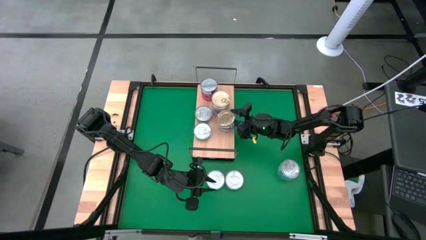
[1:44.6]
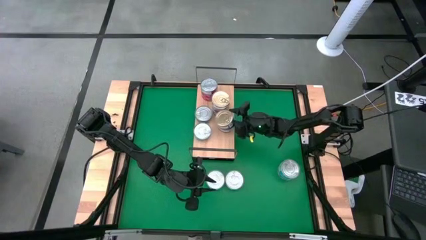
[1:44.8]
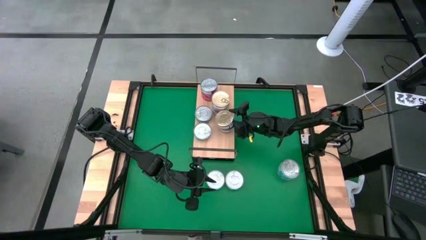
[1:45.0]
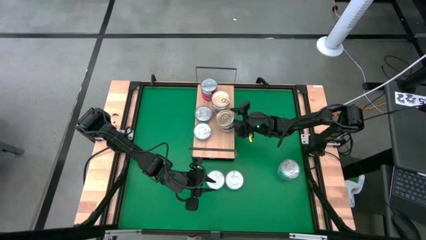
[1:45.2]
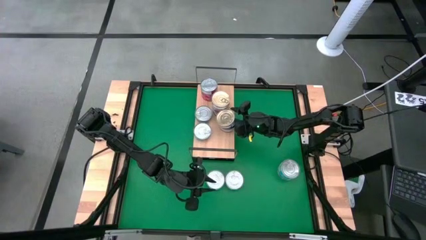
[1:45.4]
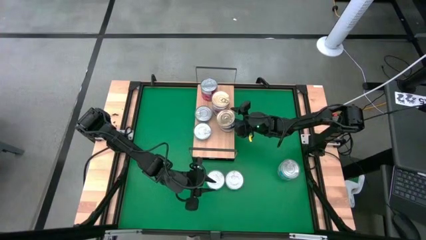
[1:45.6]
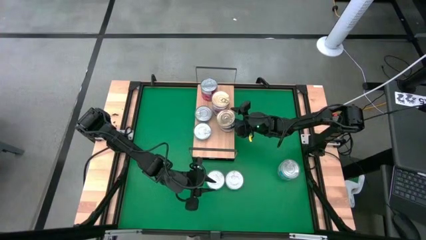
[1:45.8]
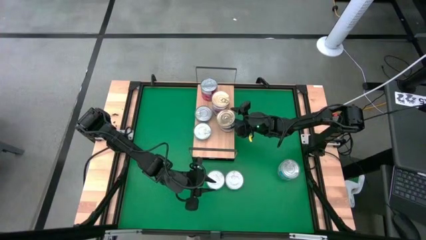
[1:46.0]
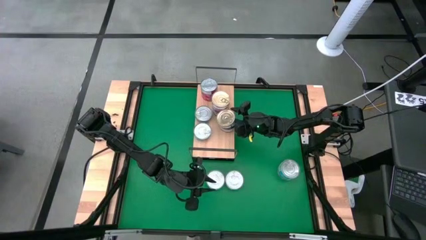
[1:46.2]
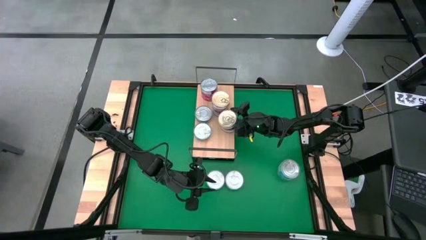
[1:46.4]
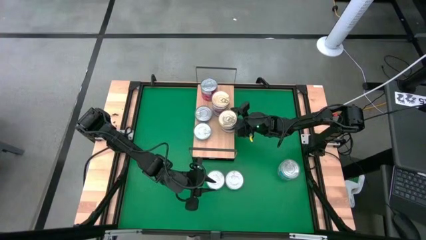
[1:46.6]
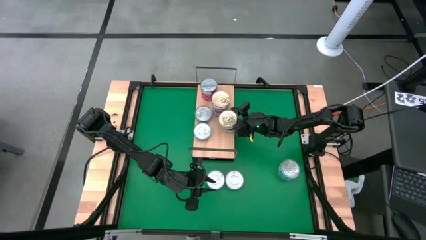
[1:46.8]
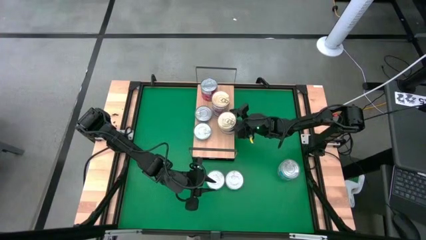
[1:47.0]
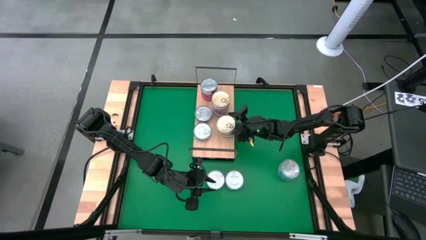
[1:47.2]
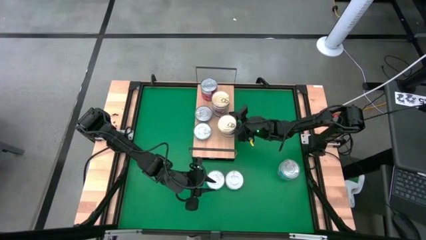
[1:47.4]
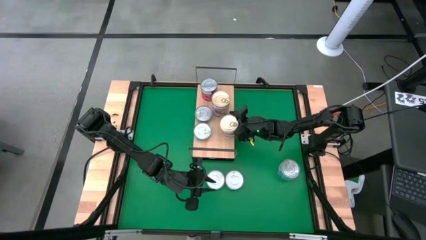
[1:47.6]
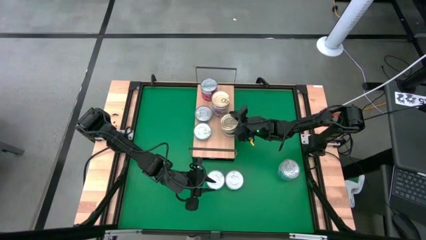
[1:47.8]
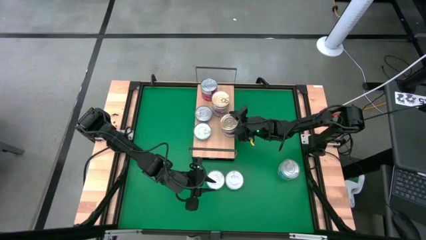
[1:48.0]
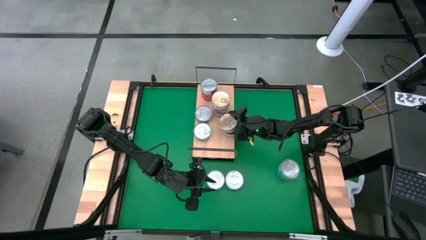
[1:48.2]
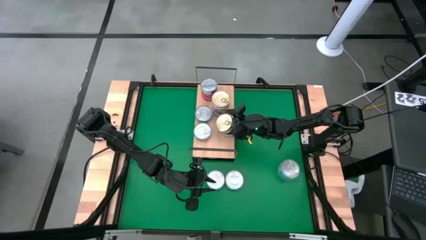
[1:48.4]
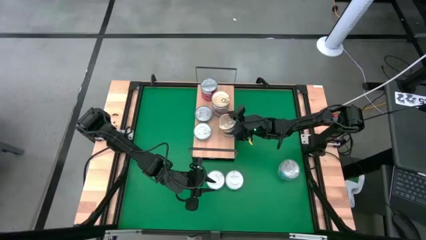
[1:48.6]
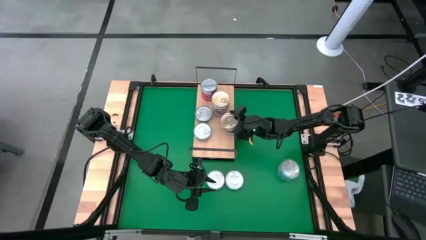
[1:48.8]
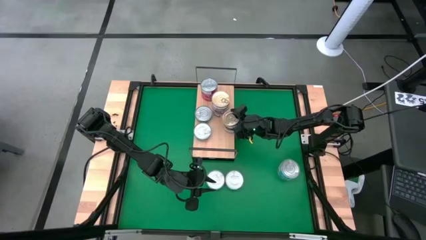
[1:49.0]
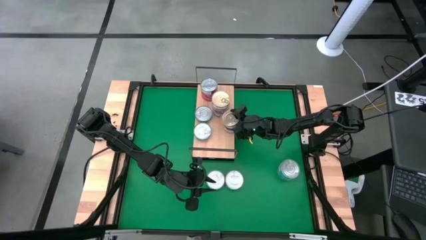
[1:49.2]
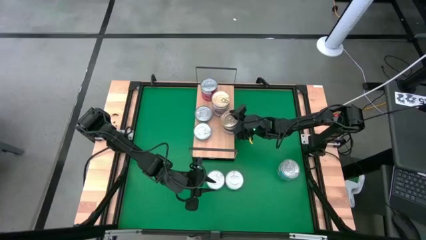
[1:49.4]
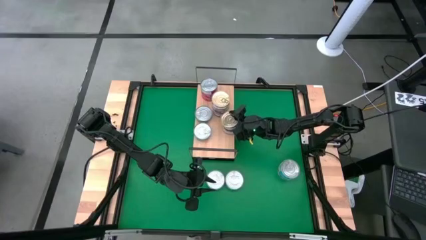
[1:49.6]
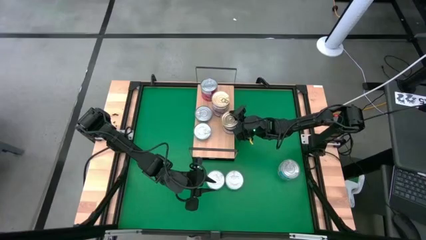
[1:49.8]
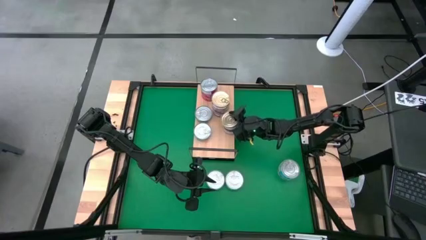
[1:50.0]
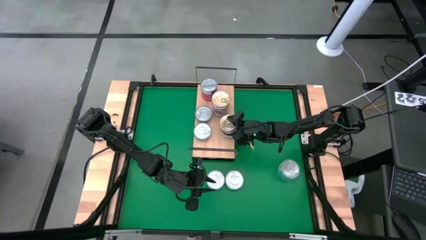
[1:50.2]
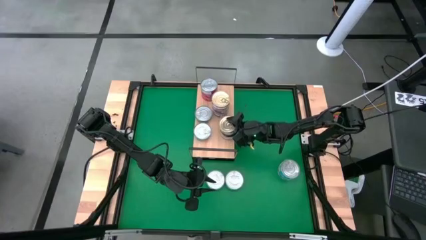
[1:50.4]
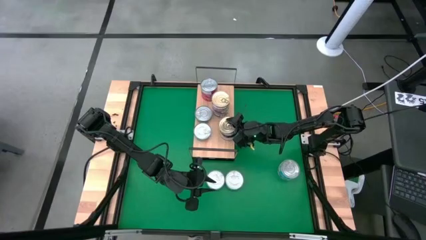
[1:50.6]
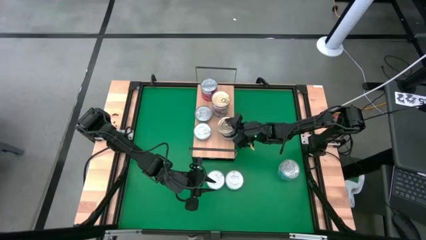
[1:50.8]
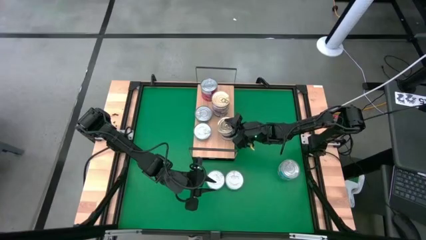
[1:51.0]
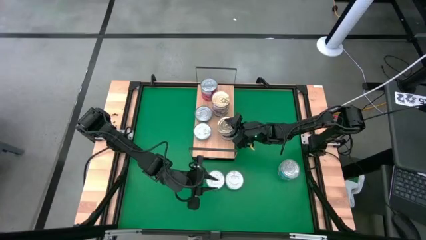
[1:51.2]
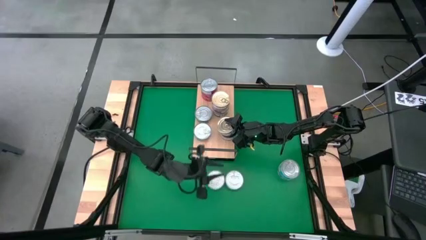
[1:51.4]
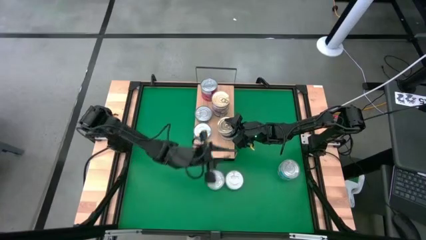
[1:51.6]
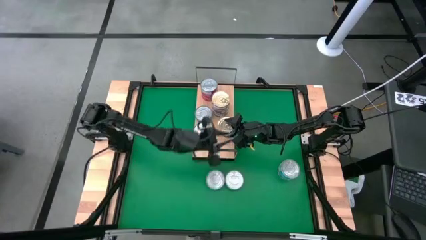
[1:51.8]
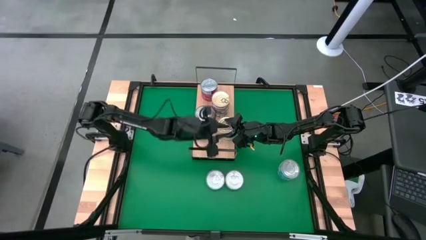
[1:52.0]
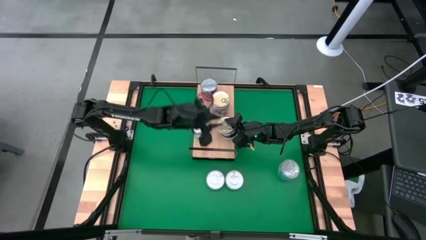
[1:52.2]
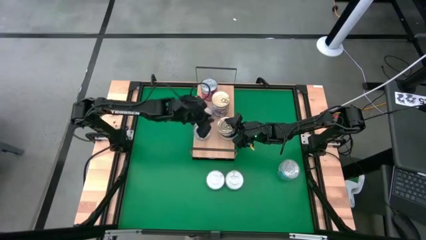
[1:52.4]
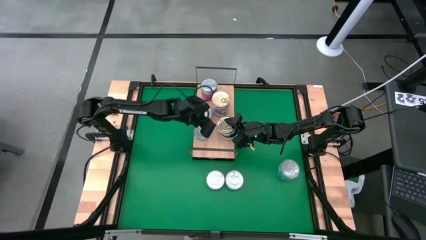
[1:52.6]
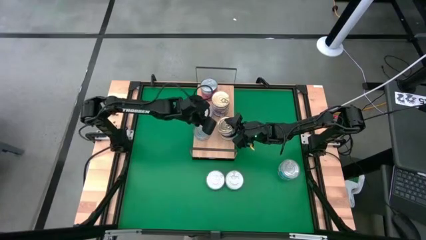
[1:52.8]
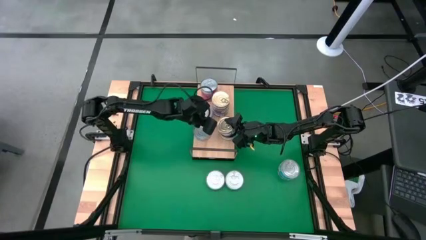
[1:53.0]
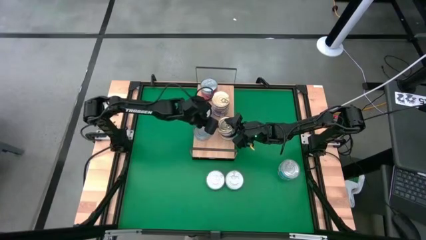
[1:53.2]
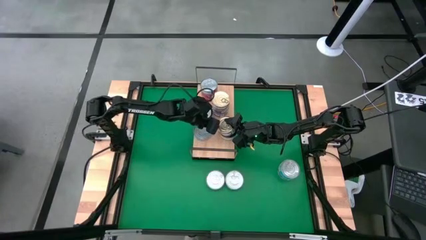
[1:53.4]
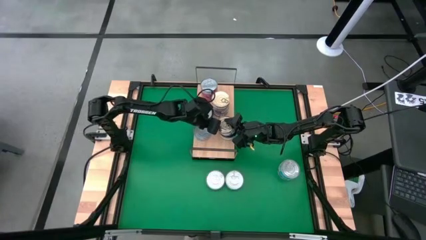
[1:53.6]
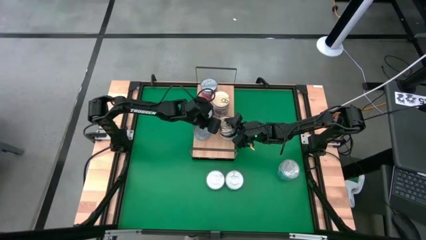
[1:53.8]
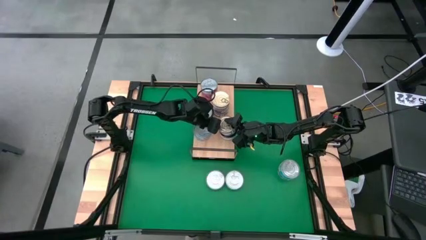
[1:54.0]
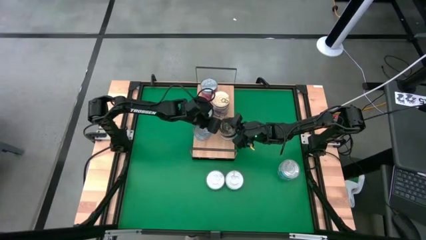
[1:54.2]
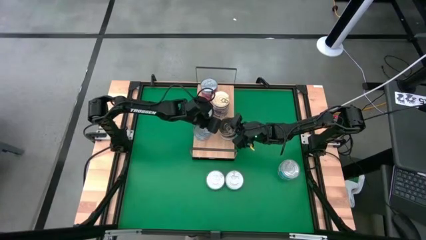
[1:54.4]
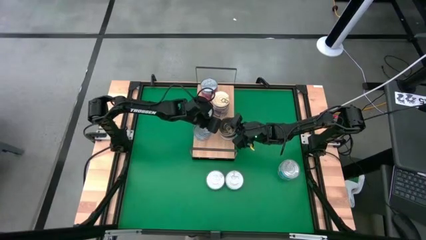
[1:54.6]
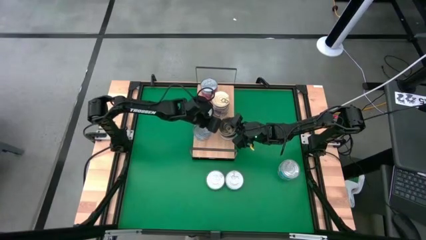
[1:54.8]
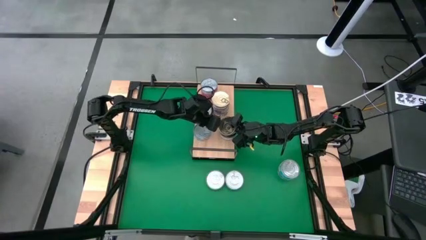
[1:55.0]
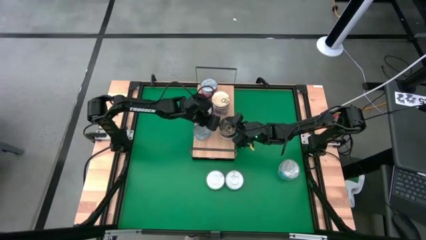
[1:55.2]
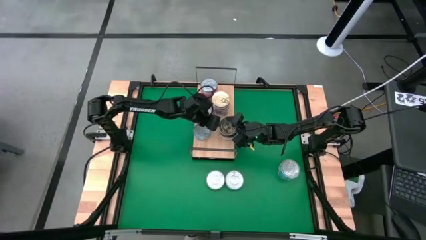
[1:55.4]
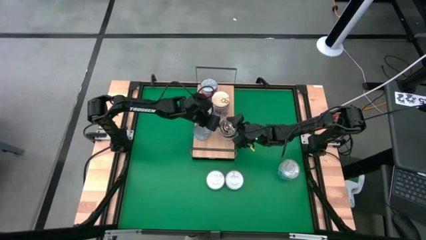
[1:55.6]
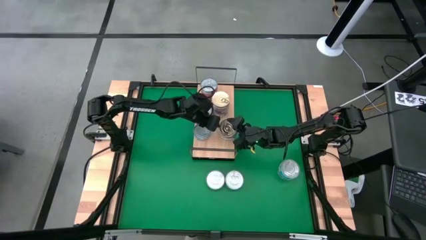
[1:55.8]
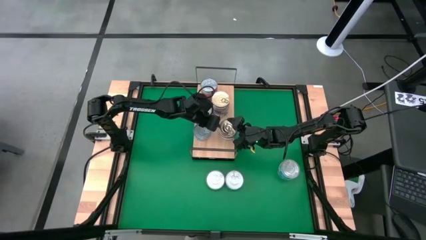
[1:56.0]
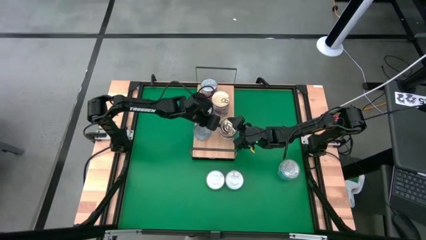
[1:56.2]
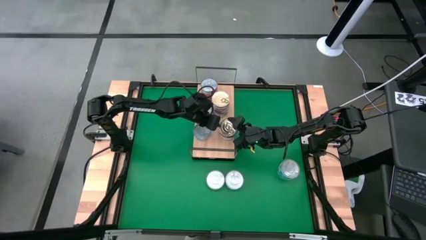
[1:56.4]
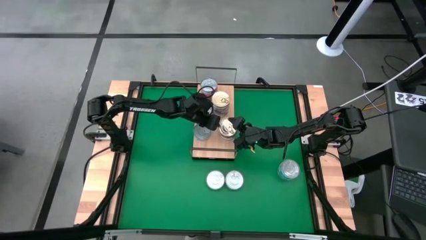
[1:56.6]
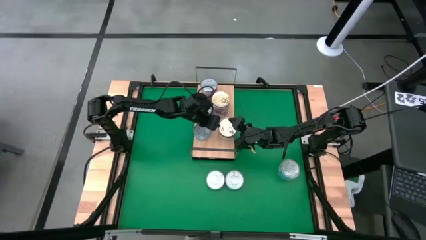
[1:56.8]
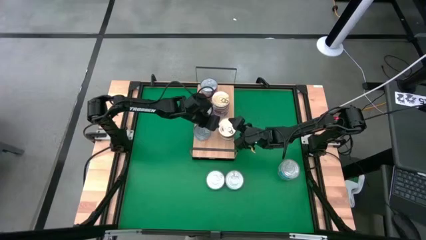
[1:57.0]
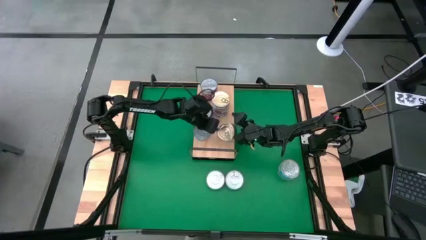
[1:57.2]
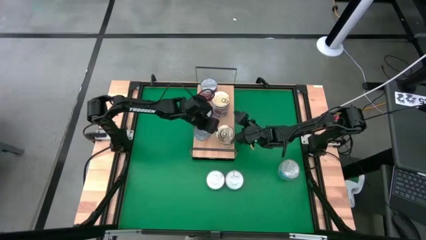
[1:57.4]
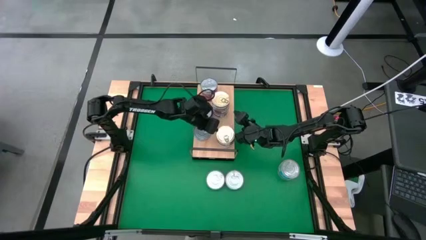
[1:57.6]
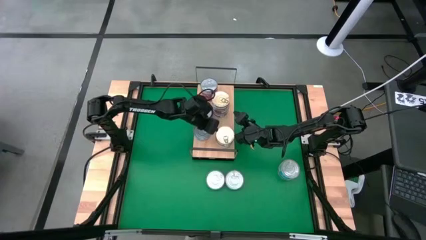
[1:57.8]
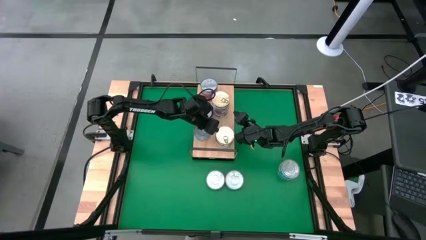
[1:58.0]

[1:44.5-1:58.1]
Task: Stack canned seafood by type on shelf
Stack the dark blue tuna can on top of the dark blue tuna can on the shelf
